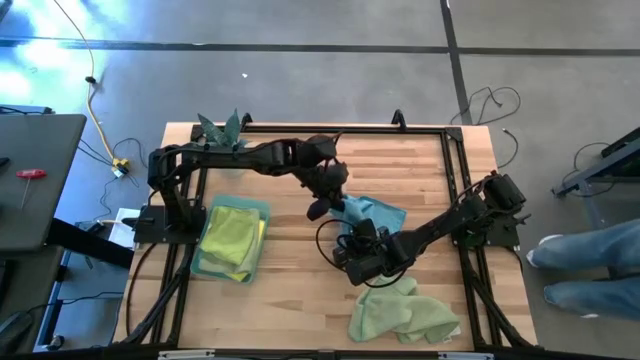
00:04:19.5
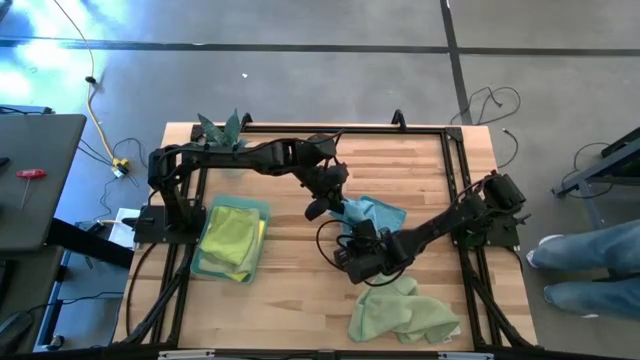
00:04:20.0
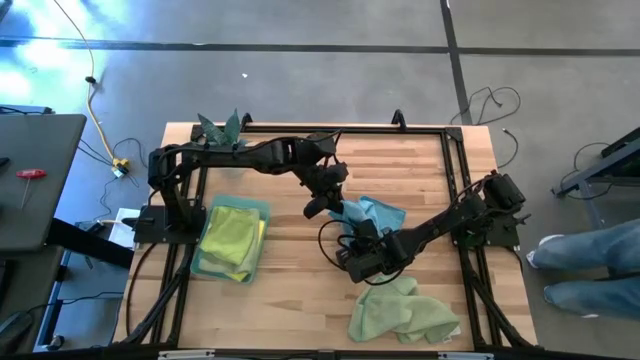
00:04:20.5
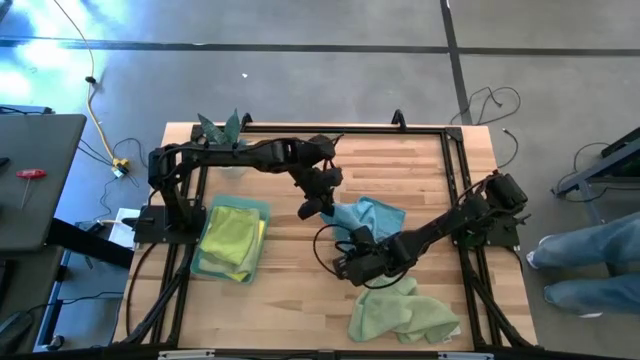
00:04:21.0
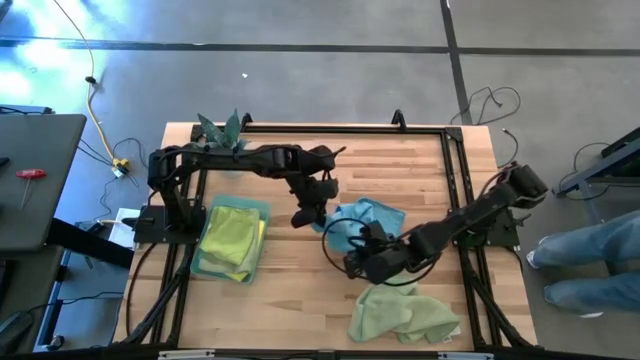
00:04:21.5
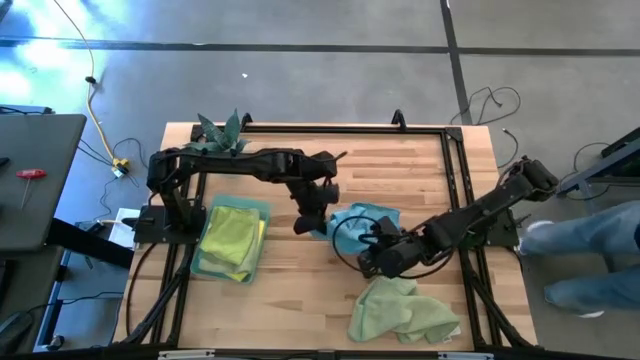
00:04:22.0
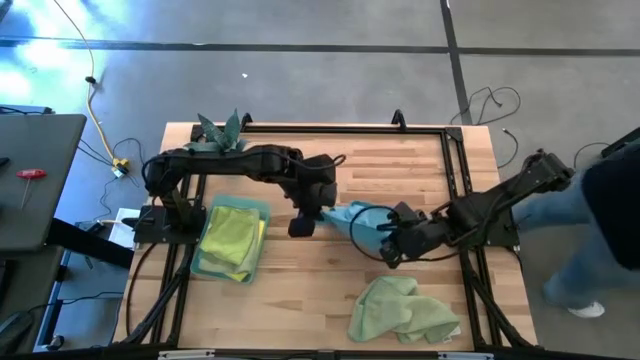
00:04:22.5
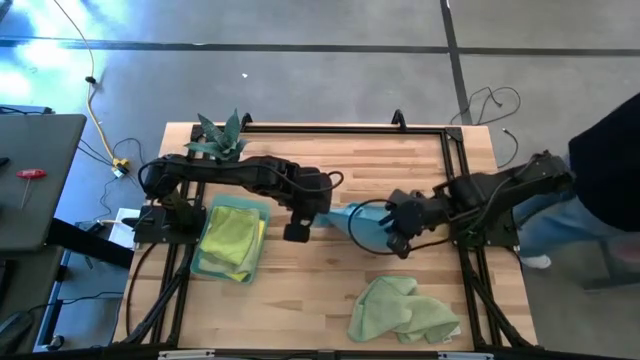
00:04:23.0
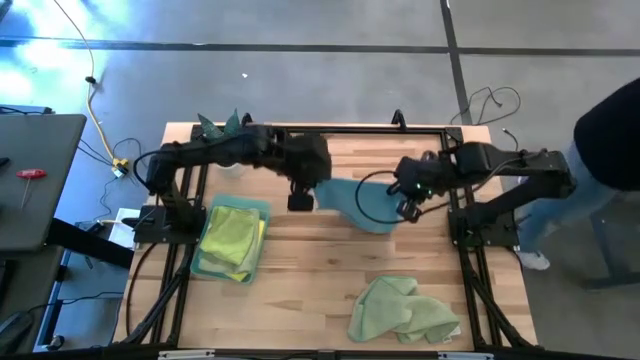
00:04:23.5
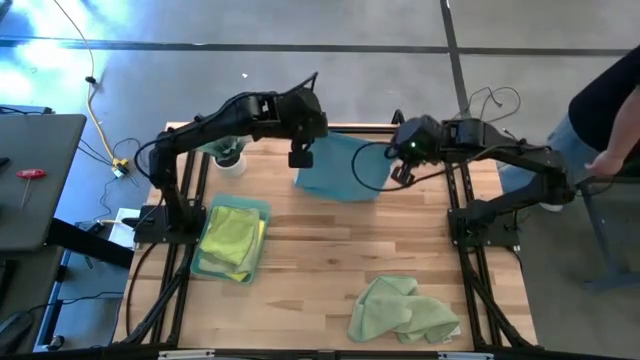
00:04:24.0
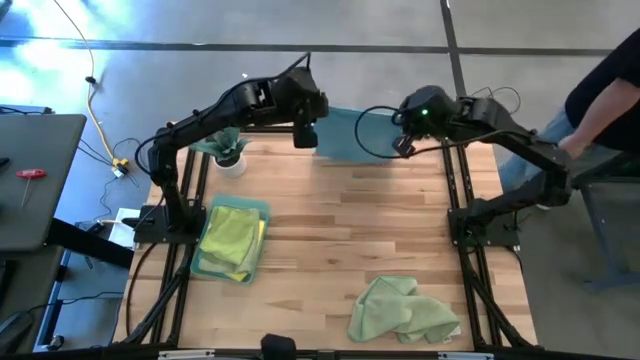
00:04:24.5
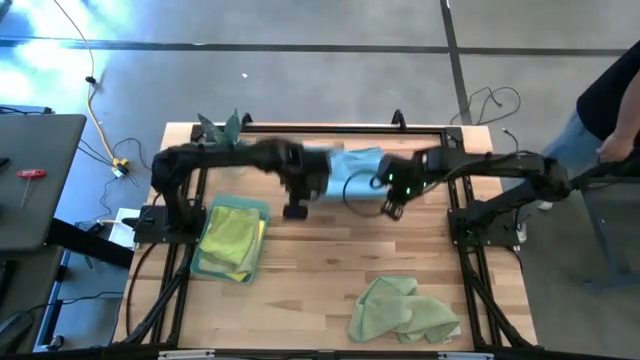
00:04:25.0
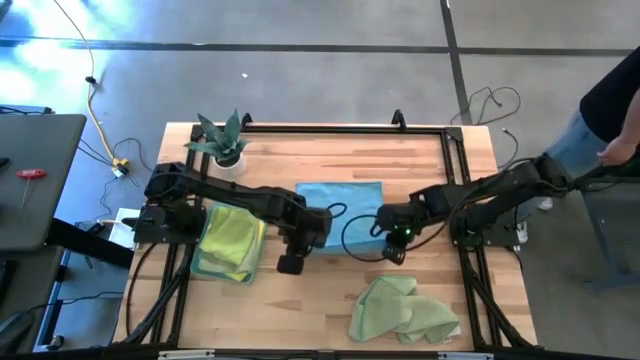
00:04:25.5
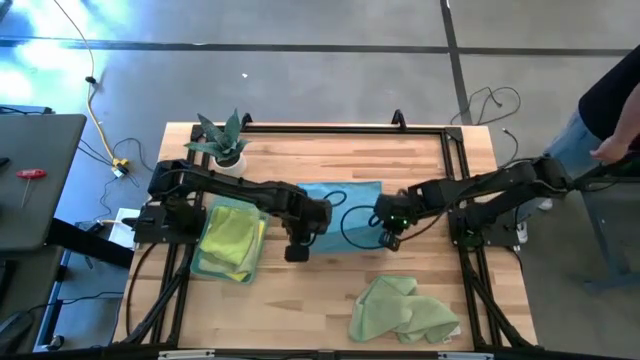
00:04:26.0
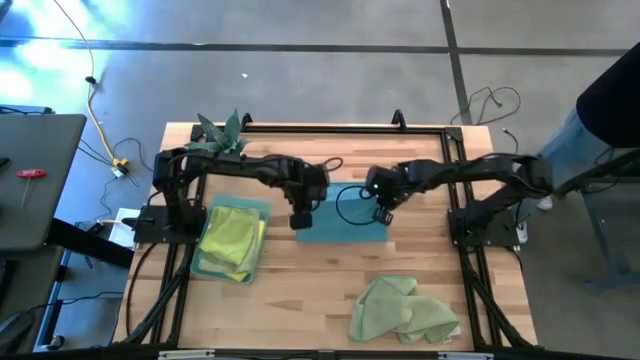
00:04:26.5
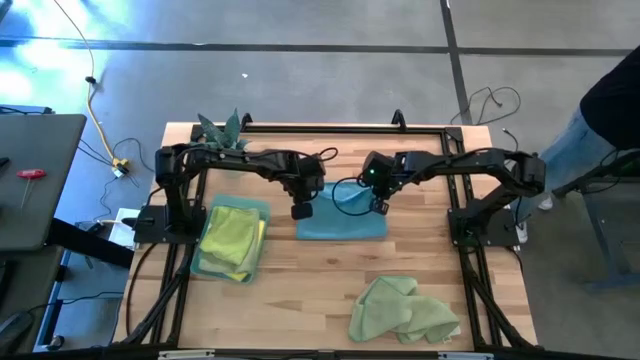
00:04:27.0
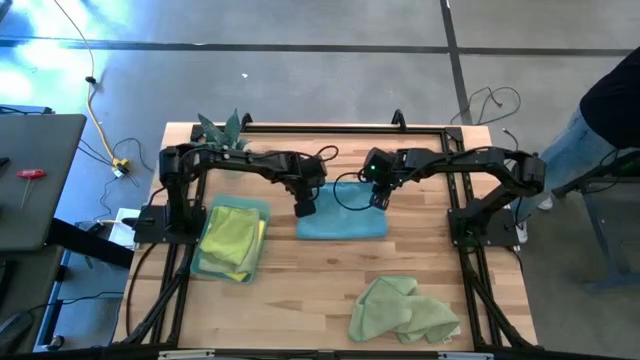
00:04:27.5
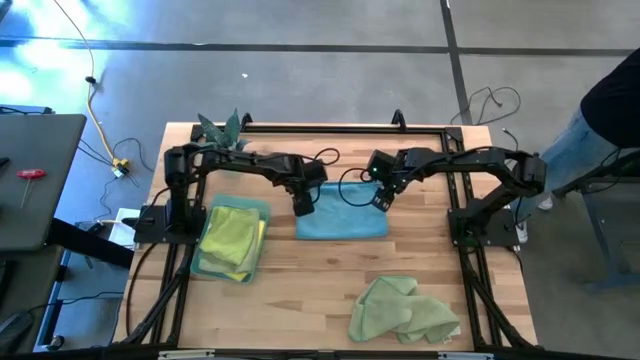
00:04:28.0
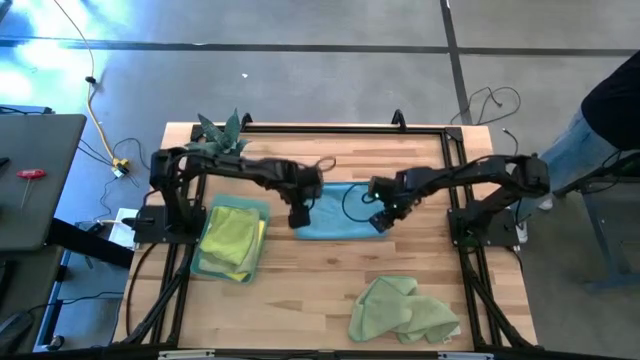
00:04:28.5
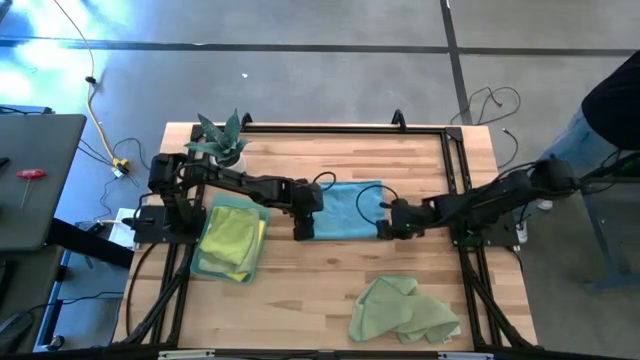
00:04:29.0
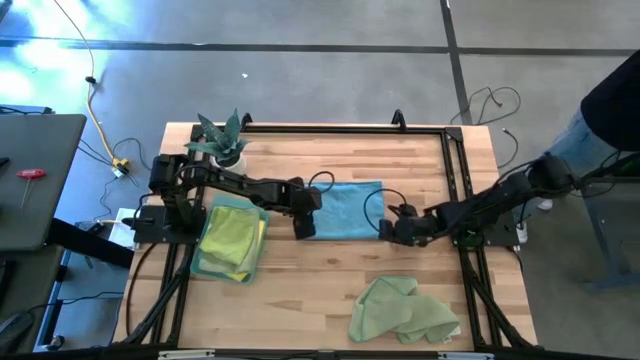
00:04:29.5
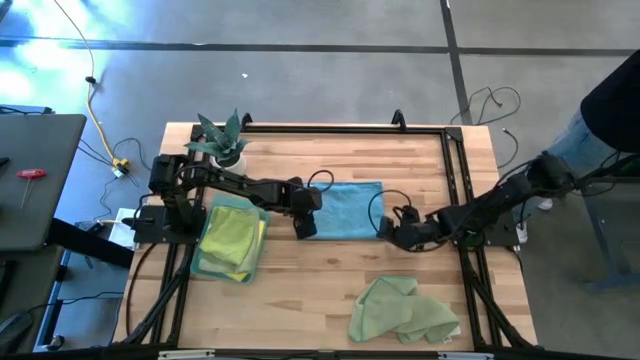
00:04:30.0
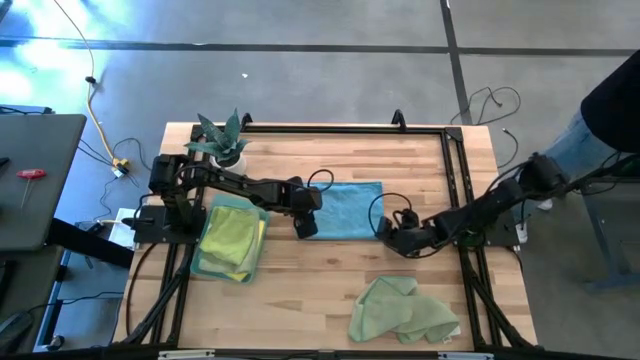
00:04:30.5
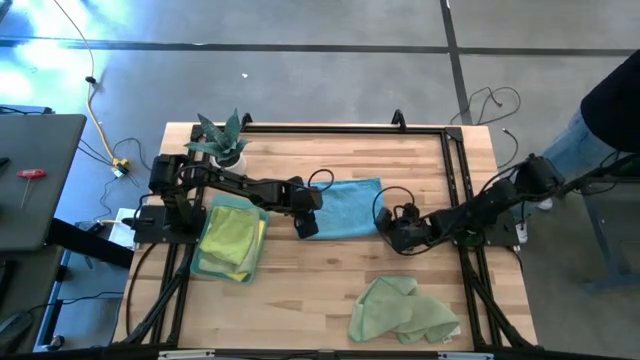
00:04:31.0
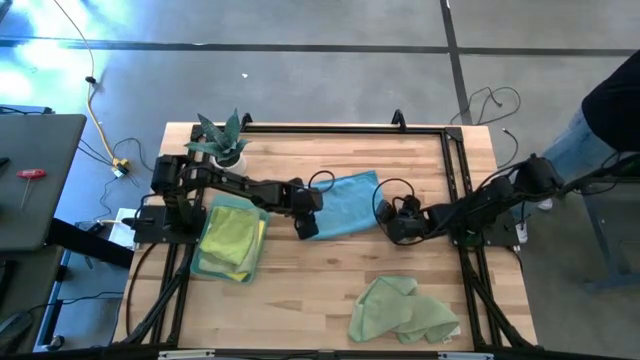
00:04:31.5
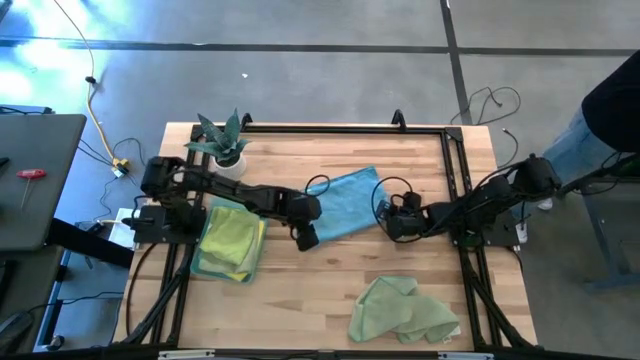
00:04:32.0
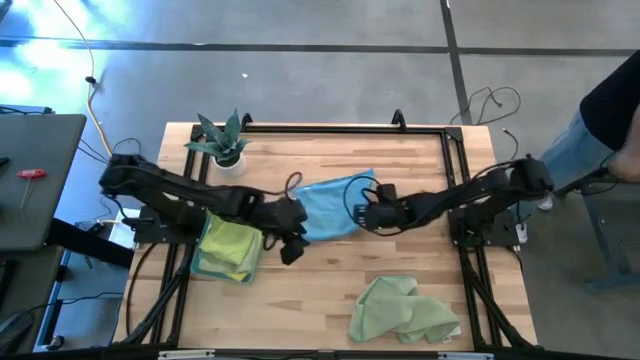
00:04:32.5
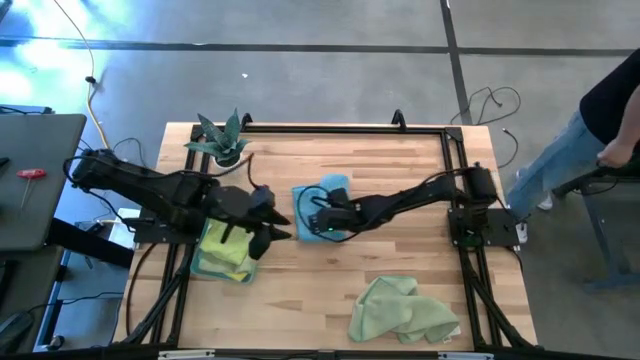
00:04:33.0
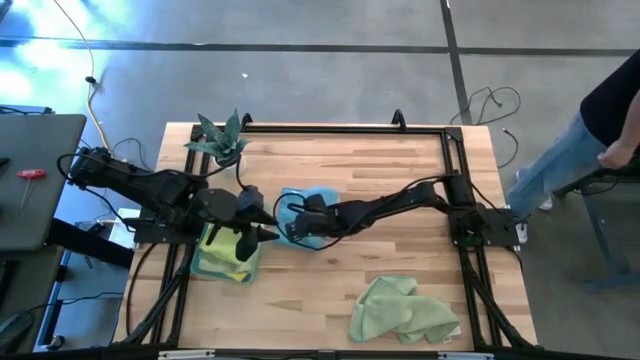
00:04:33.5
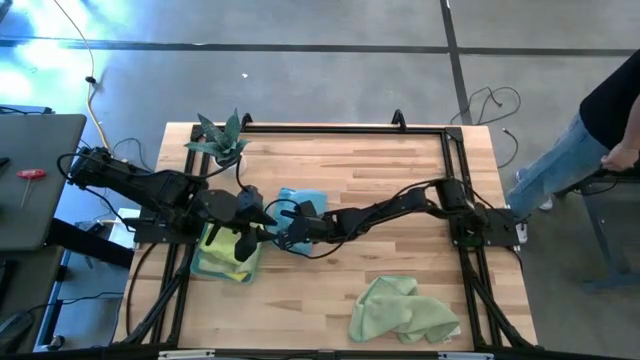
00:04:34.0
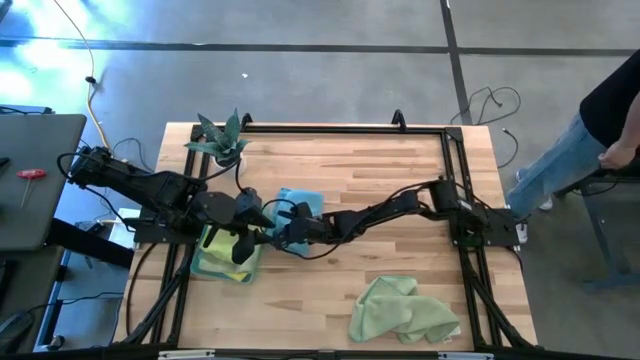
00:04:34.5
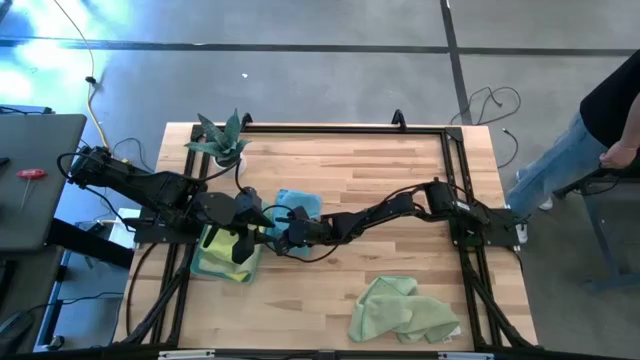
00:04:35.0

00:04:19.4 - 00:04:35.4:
Task: Fold microfiber towels
Fold the blue microfiber towel

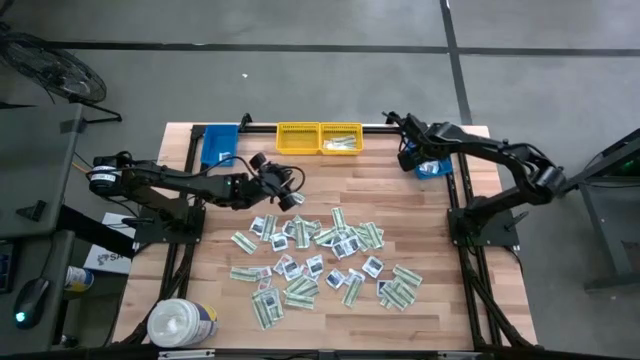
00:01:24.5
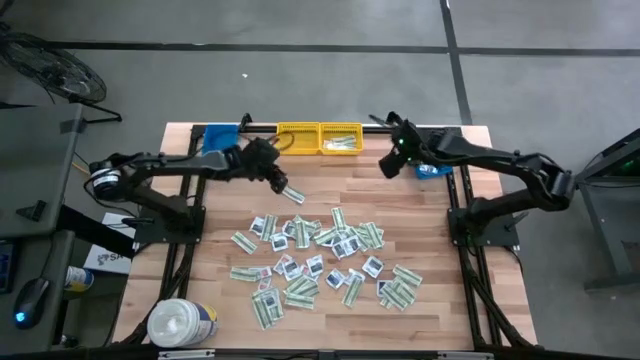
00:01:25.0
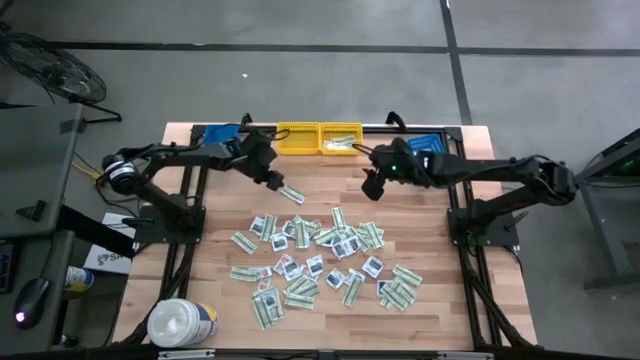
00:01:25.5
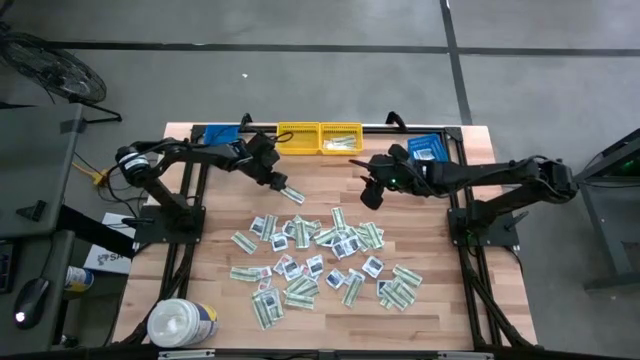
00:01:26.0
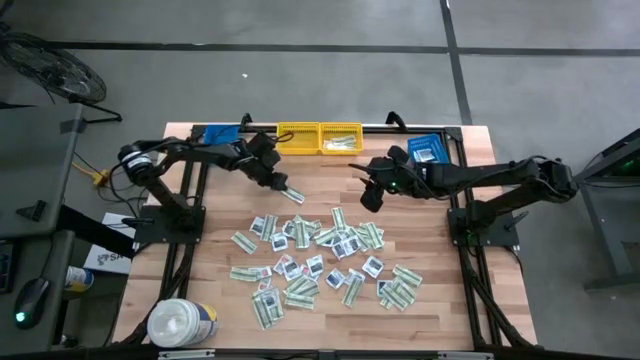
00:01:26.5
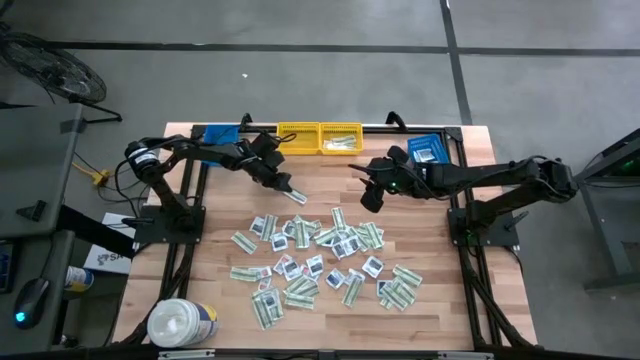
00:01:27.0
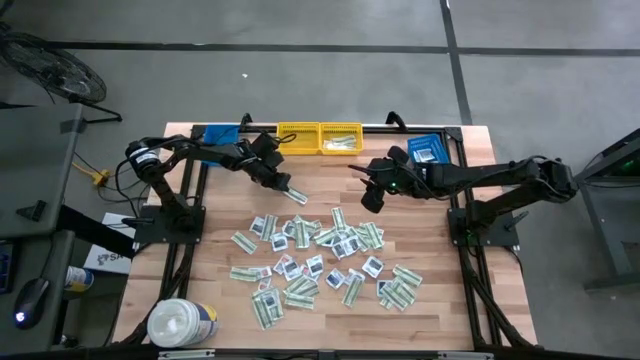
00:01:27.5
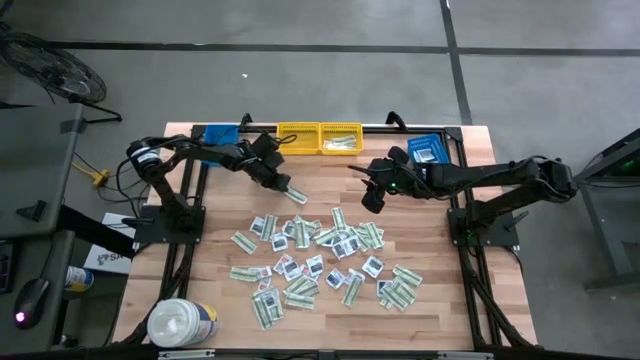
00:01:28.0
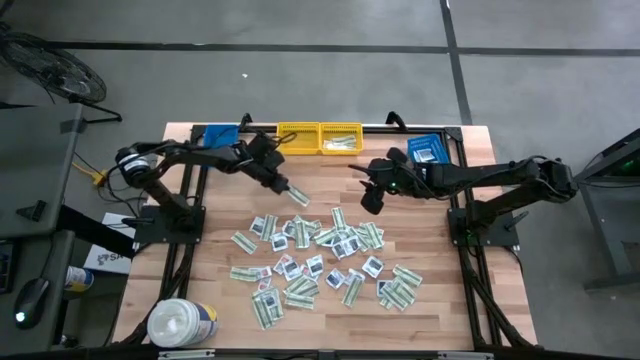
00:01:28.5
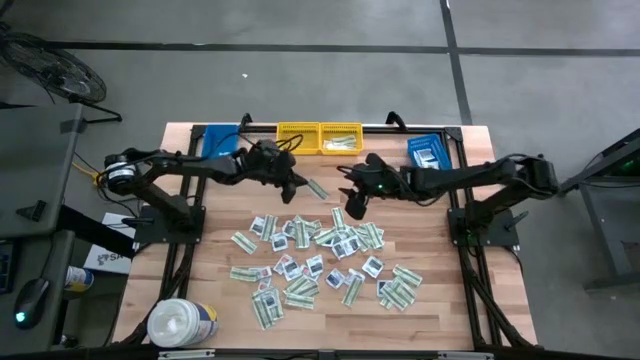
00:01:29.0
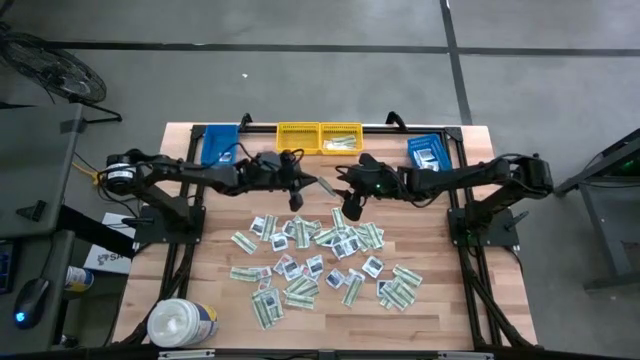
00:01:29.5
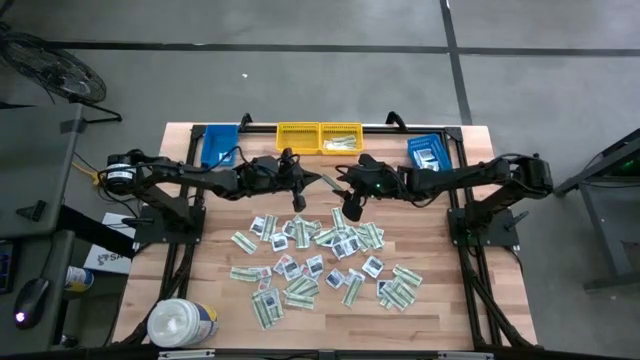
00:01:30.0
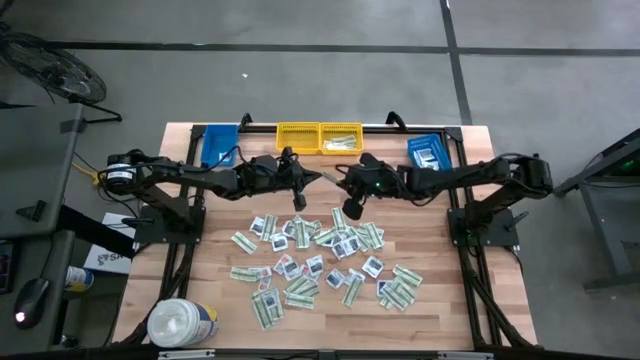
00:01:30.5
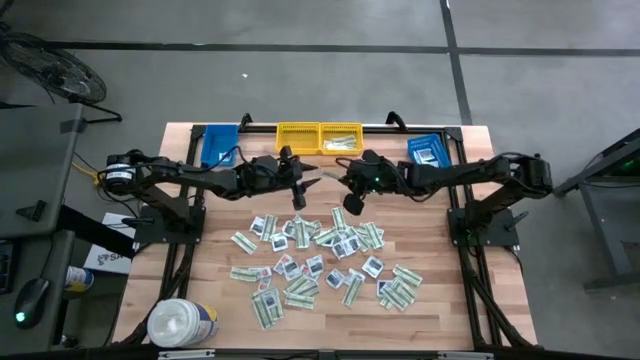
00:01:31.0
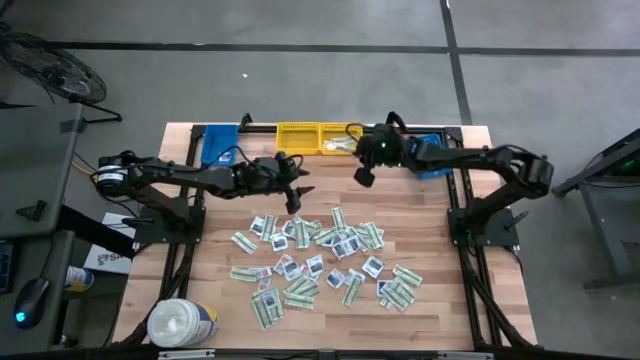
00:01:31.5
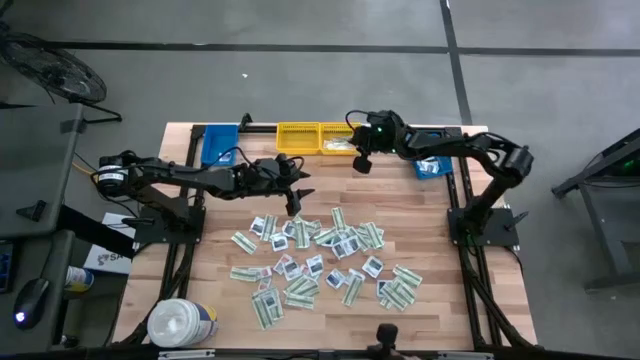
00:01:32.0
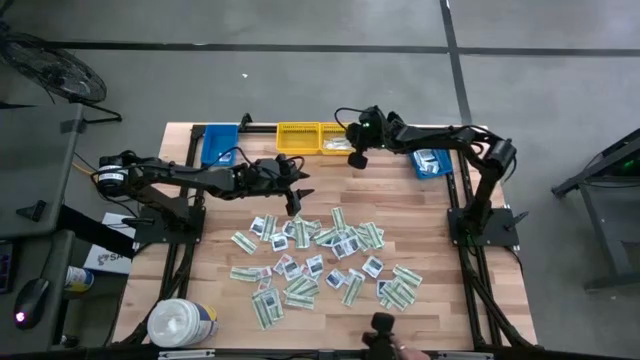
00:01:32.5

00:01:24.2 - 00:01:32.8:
Task: Pick & Place First Aid Supplies
Put the green bandage pack into the right yellow bin
